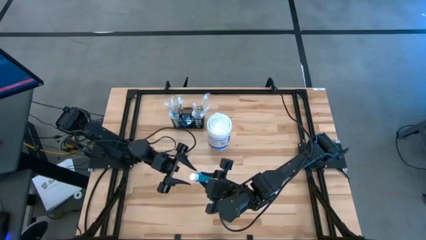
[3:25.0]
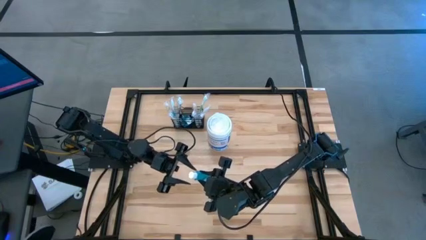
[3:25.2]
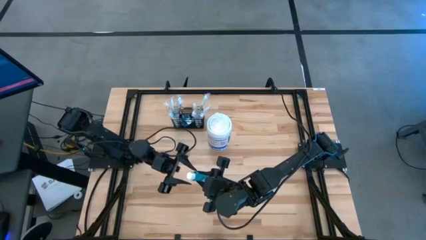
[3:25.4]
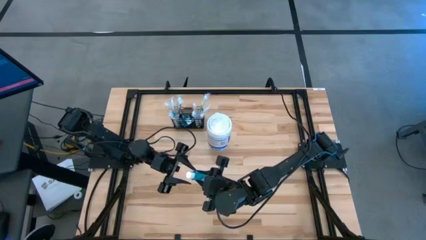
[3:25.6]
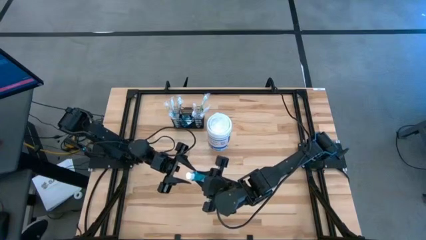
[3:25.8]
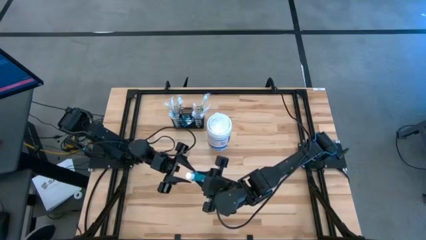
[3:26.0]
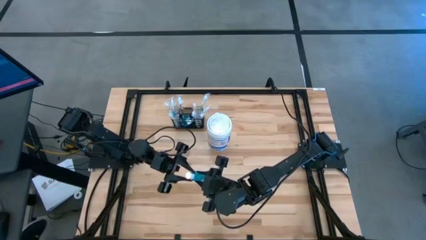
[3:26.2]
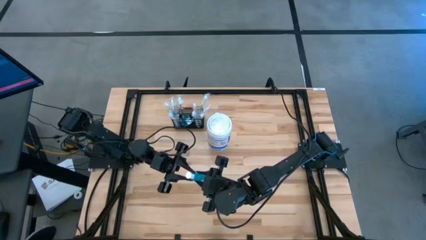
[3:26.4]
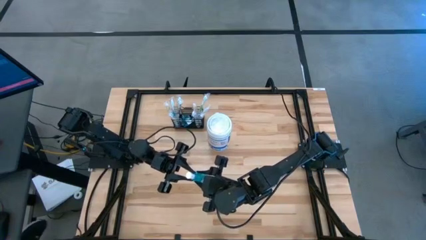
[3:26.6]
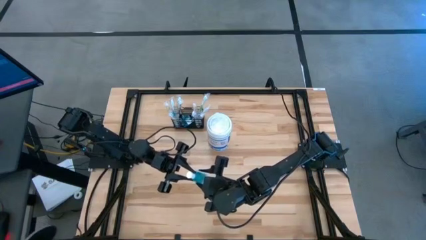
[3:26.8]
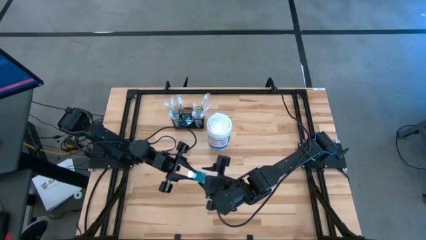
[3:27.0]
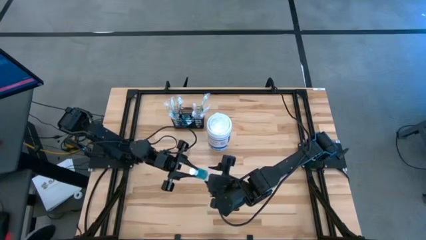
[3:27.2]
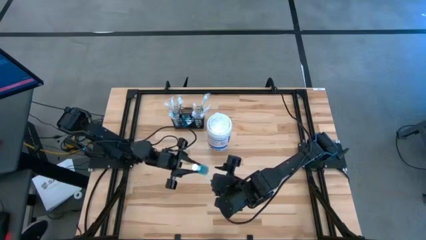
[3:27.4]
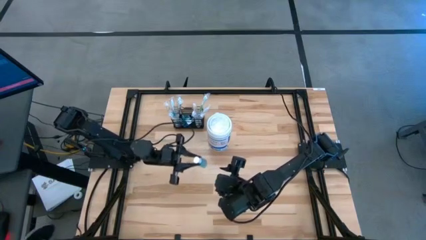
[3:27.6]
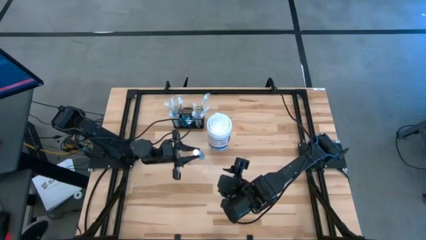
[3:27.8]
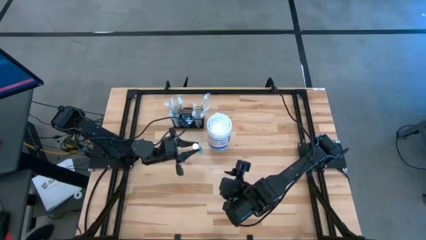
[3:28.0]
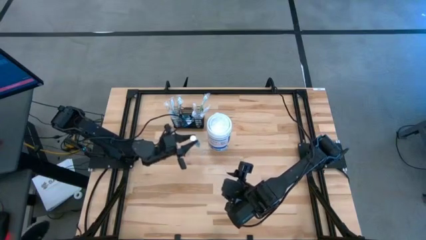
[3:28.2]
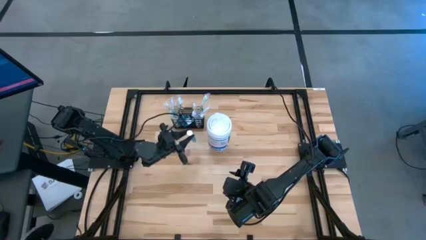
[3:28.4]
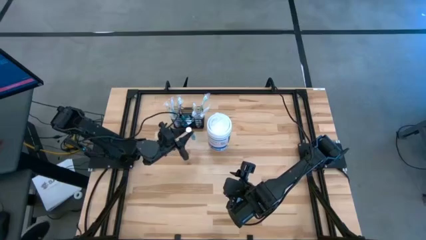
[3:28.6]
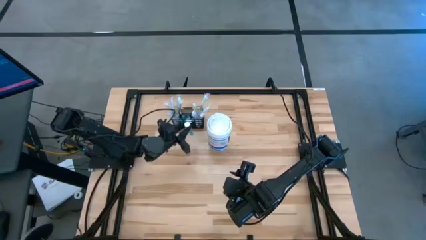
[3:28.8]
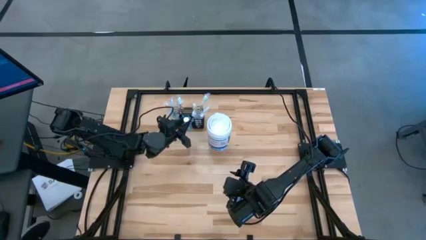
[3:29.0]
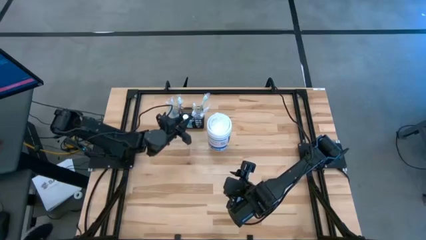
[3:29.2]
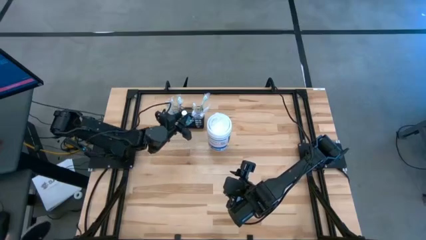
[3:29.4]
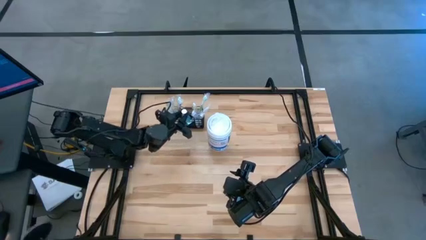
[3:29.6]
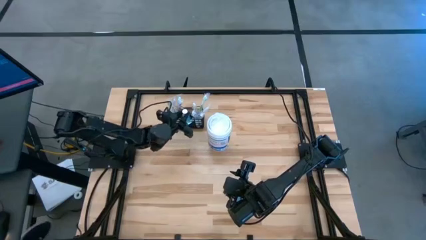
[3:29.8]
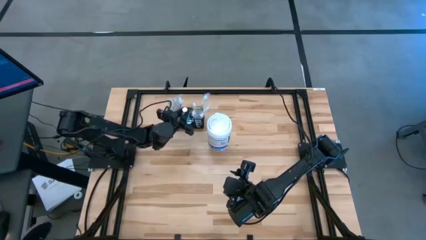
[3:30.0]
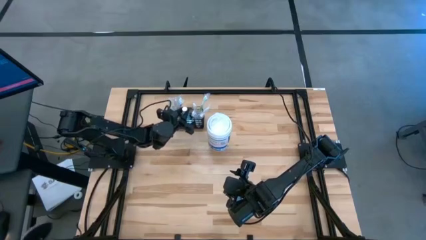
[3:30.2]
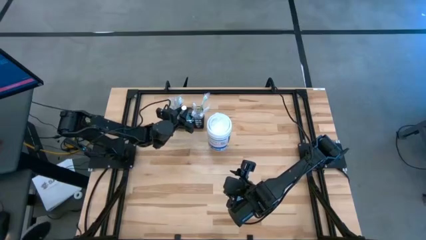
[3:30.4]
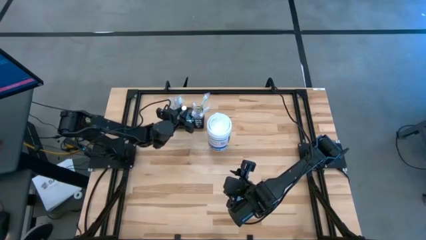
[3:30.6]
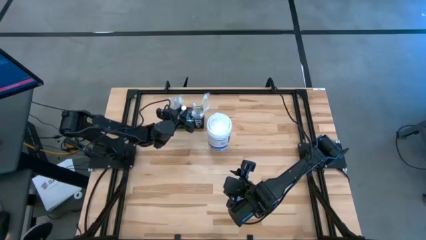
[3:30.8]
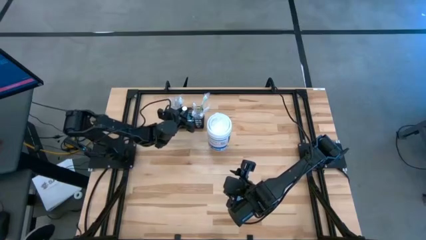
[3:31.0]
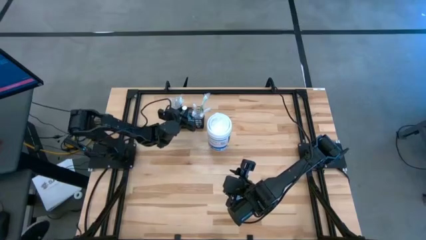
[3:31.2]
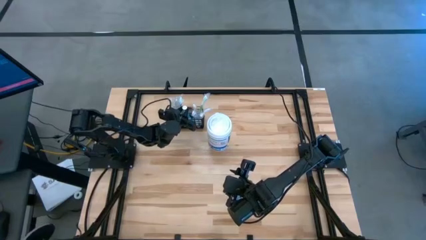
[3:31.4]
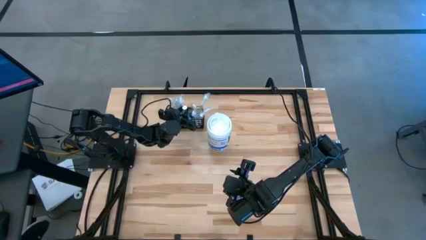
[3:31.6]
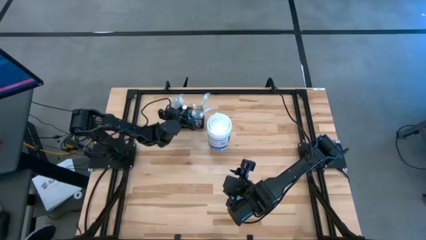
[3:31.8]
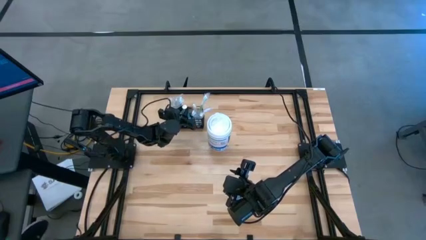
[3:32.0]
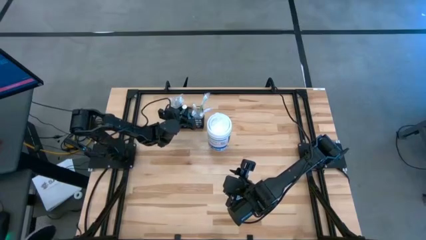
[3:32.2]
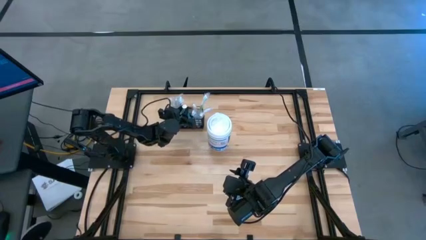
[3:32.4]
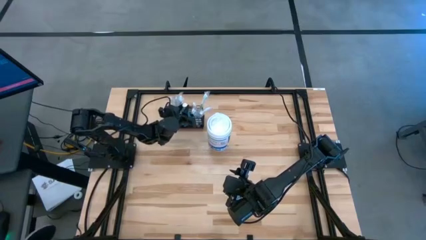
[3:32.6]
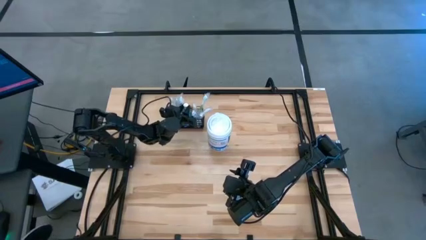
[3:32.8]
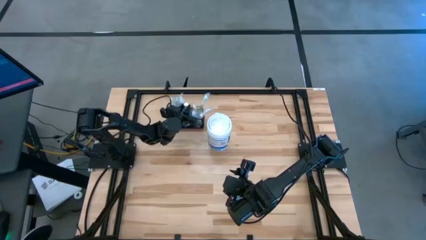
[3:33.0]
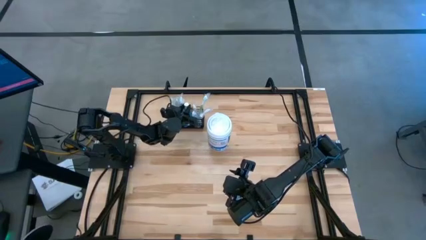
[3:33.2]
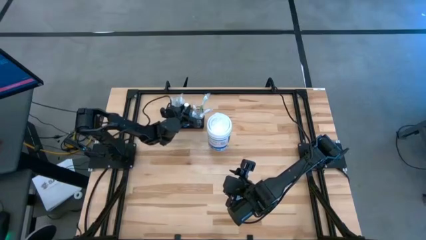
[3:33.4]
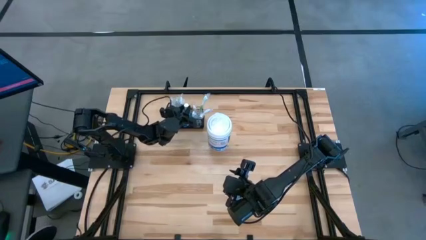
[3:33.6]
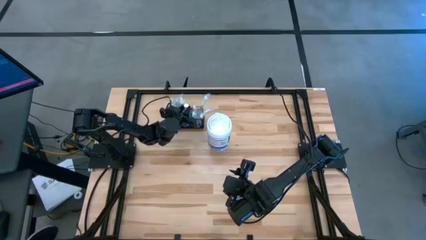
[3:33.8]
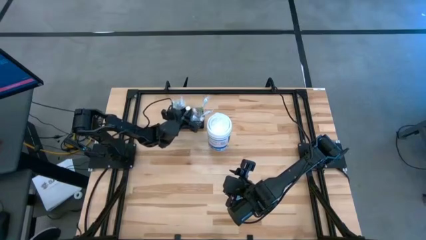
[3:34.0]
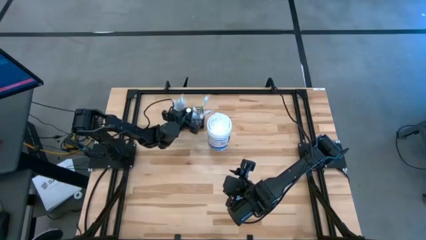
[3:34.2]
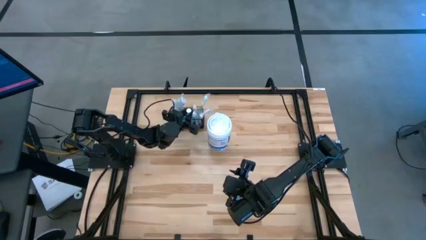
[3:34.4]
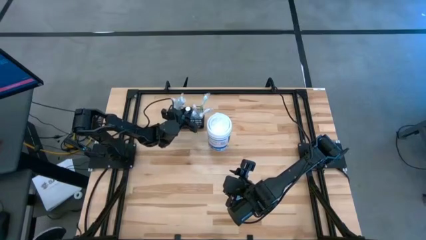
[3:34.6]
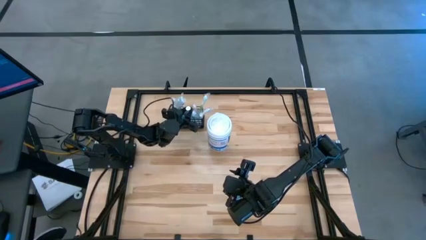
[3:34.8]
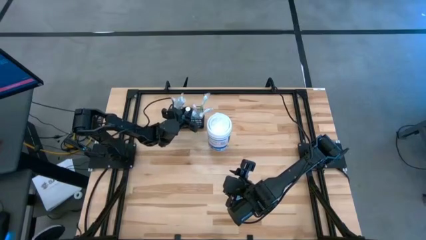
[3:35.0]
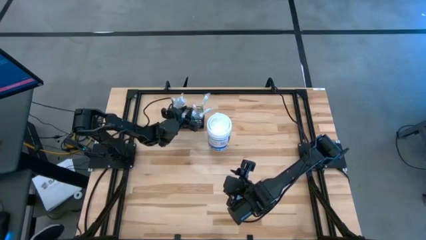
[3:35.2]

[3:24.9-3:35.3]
Task: Pick & Place toothbrushing station
Put the blue mouthwash into the mesh organizer

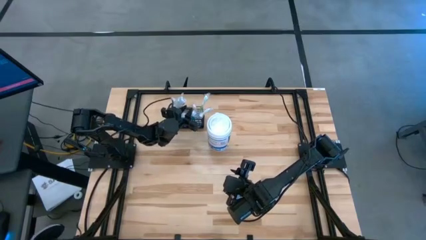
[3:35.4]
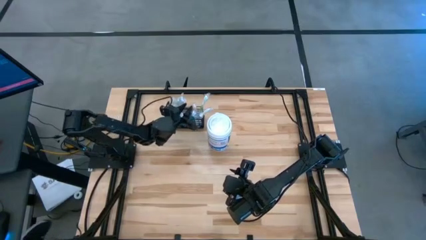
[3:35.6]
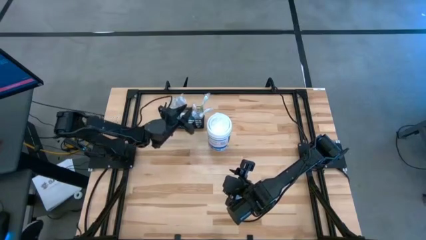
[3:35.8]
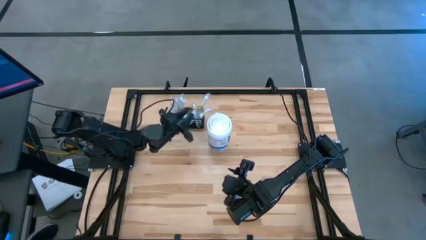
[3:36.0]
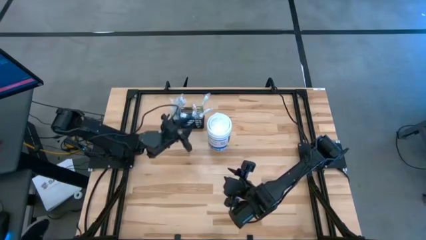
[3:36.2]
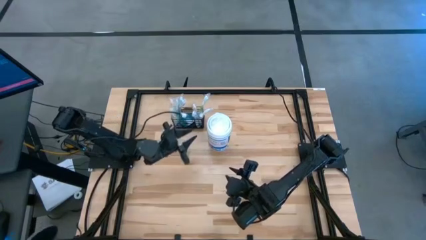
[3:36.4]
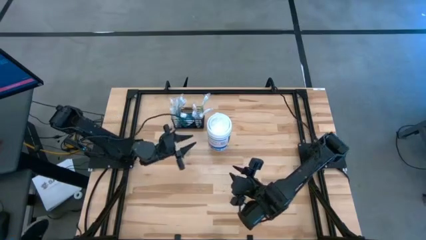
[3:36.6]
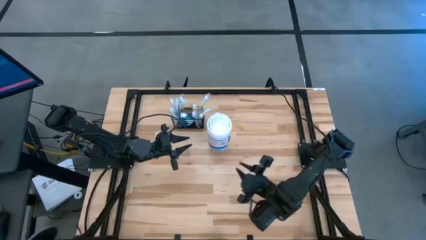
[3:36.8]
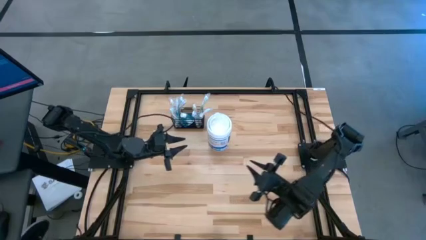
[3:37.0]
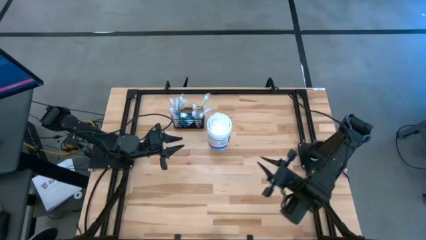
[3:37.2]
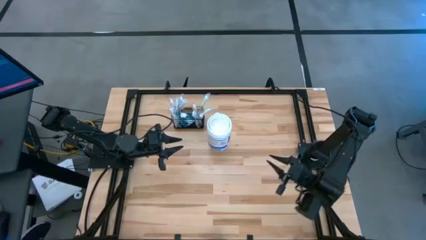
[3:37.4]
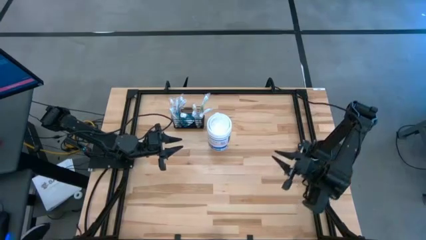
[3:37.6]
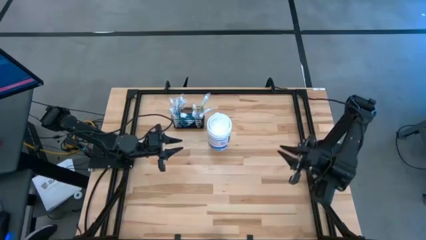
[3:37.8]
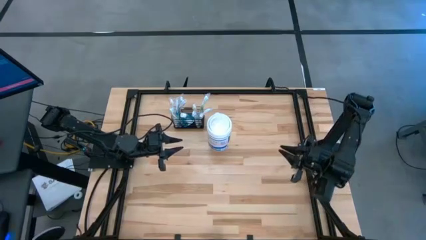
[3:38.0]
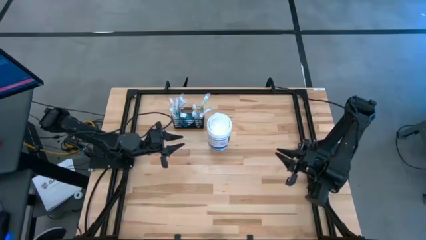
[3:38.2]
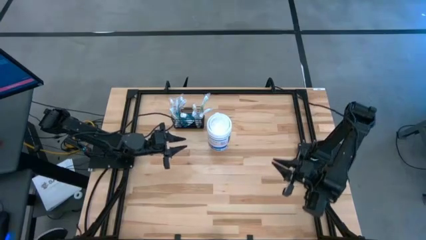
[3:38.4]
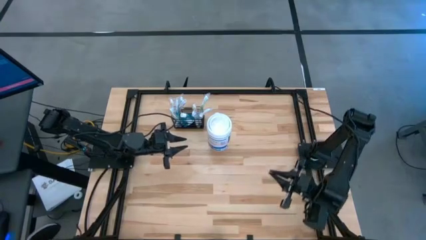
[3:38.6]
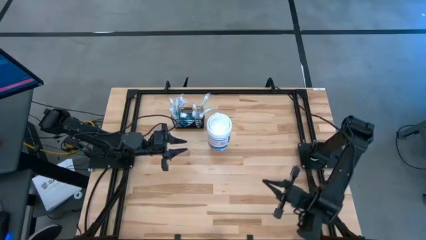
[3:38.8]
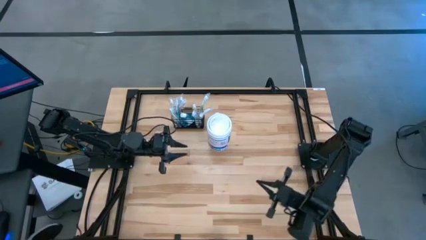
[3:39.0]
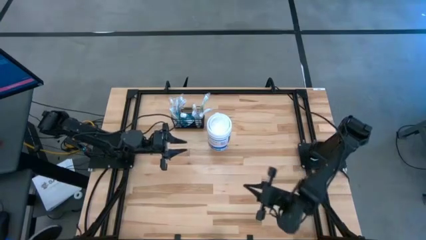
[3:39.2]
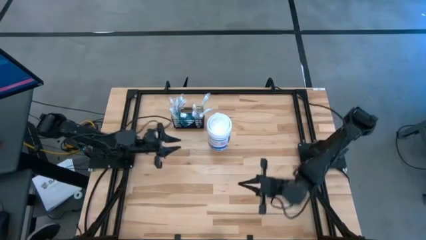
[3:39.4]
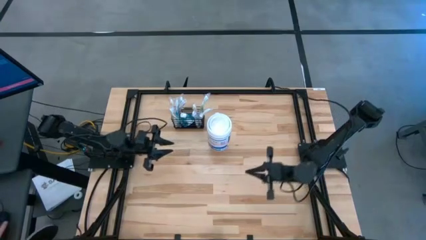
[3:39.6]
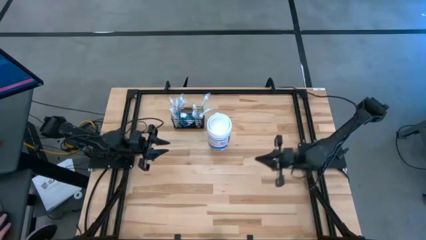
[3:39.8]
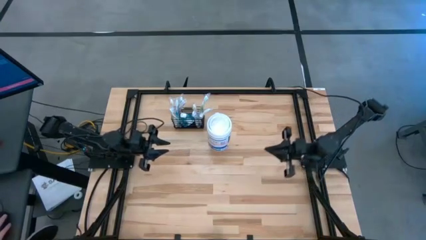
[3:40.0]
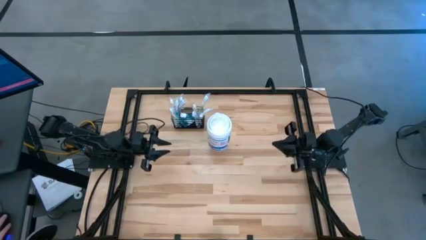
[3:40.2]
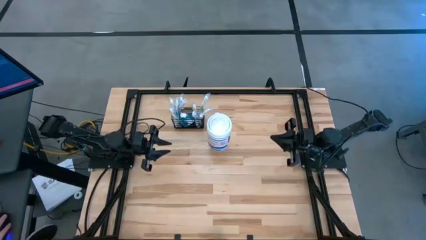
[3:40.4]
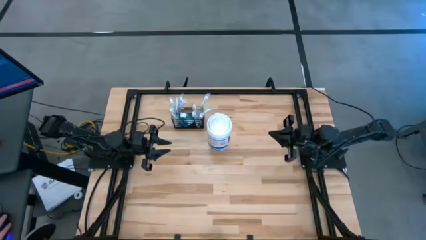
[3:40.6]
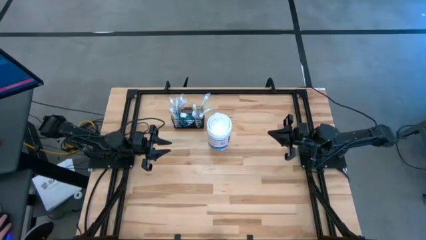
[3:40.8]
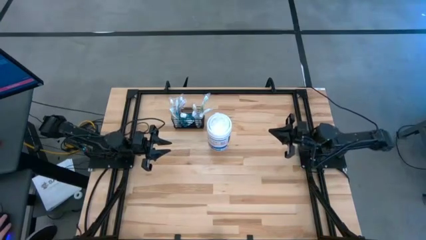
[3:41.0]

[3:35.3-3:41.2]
Return to Home Position
